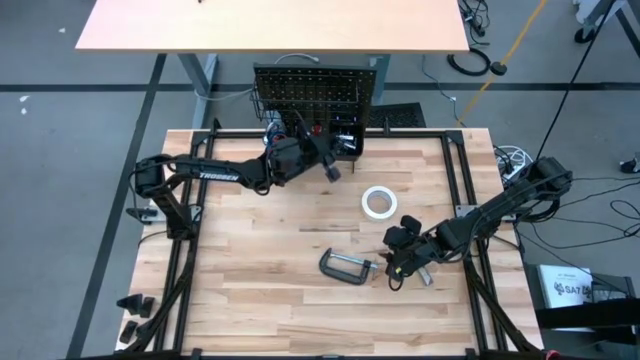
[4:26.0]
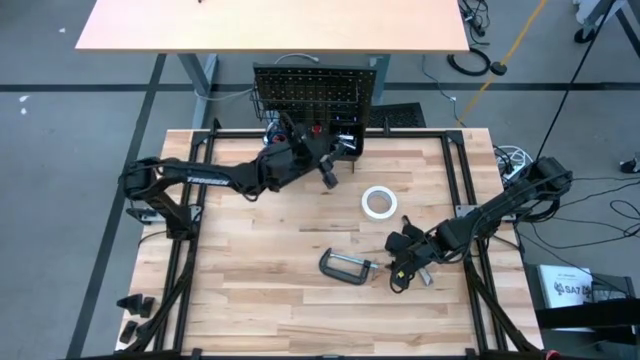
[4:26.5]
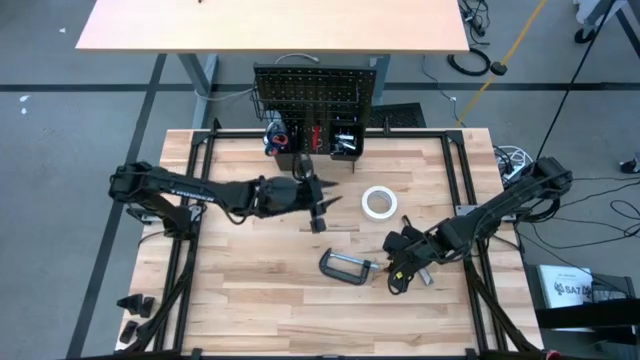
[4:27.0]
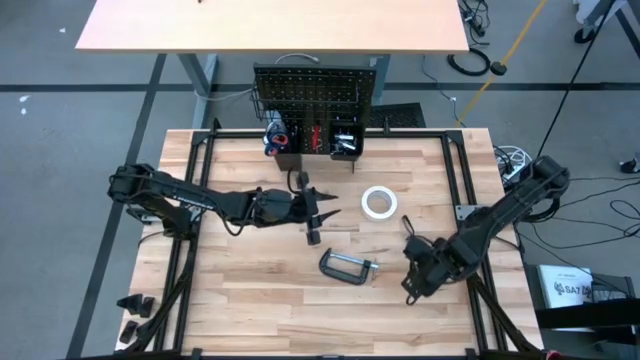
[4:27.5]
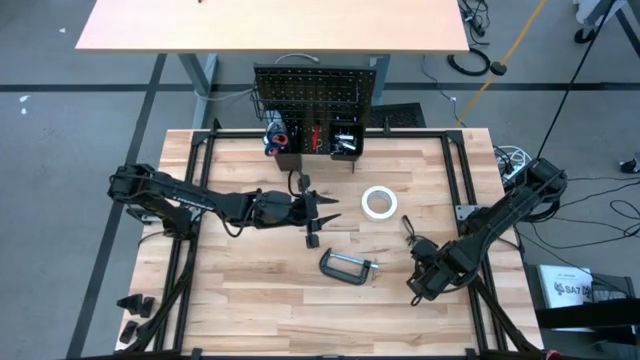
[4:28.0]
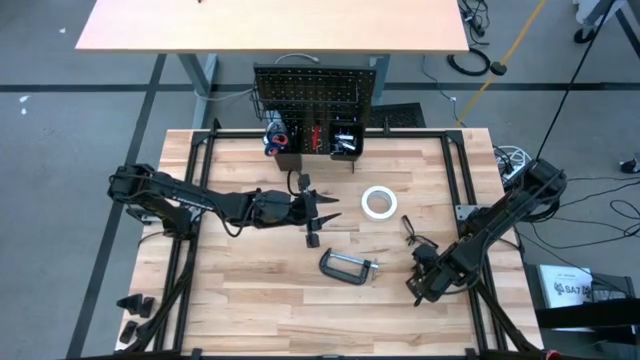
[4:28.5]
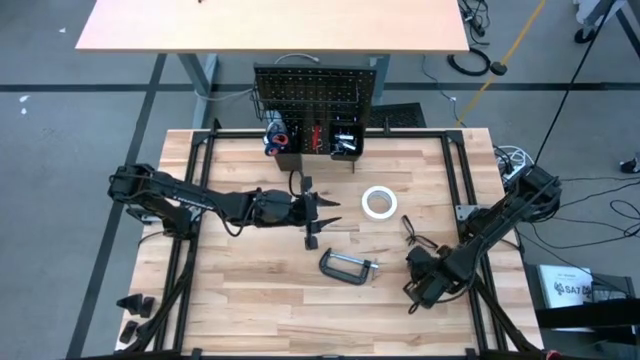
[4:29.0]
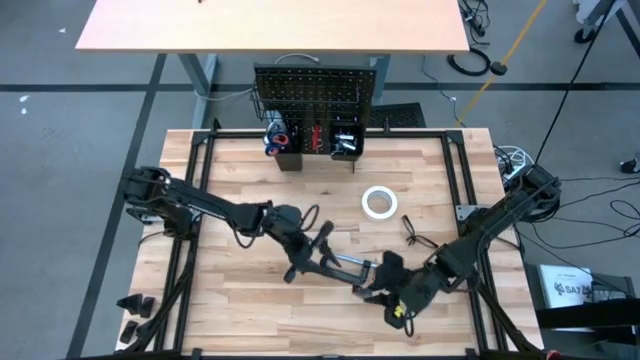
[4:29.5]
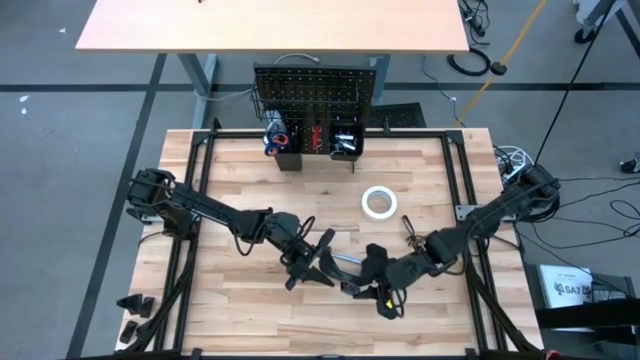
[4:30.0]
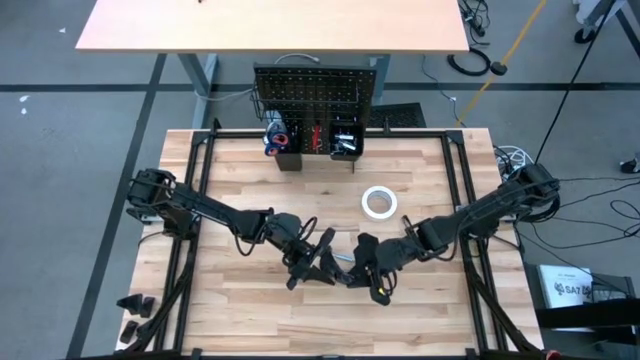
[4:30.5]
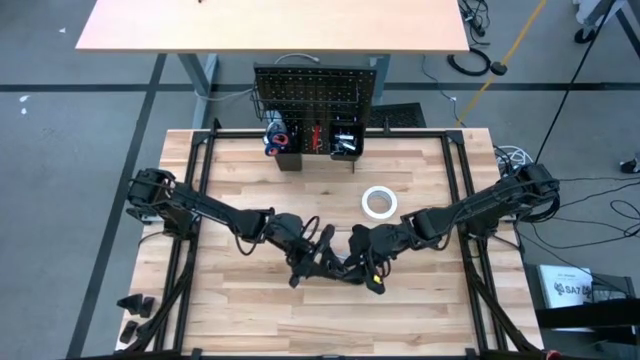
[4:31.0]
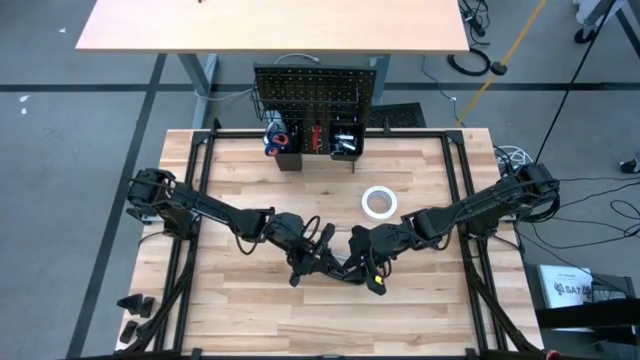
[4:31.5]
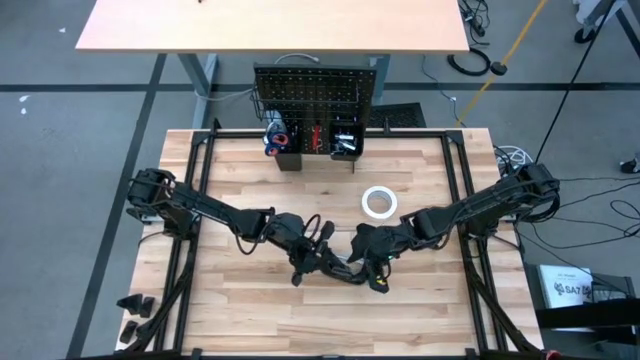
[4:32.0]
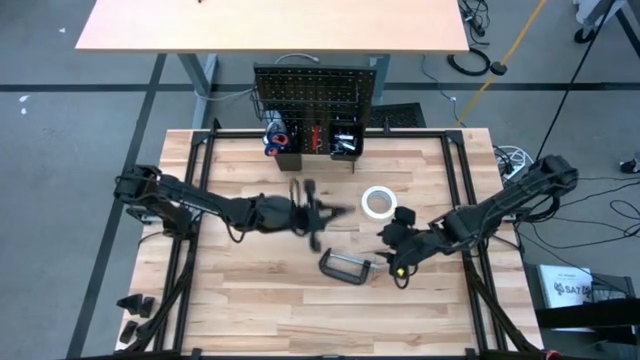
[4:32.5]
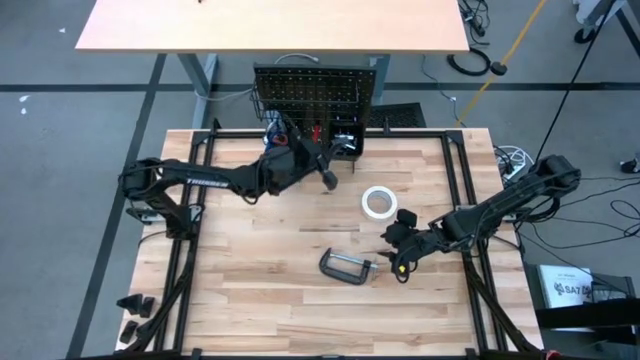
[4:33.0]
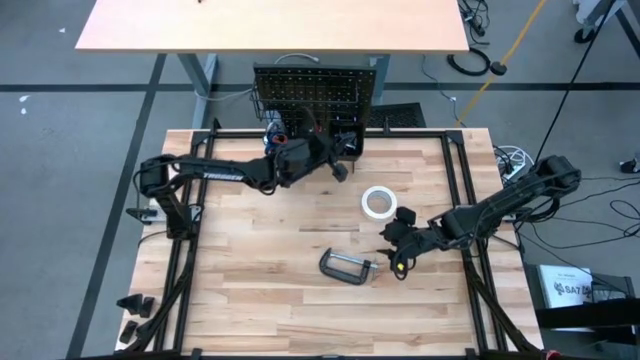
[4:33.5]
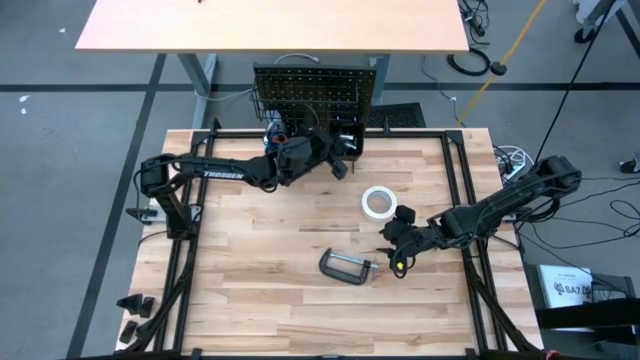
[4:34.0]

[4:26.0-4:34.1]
Task: Hang tools onto peg board
Put the hand plane on the right lower deck of the pegboard
